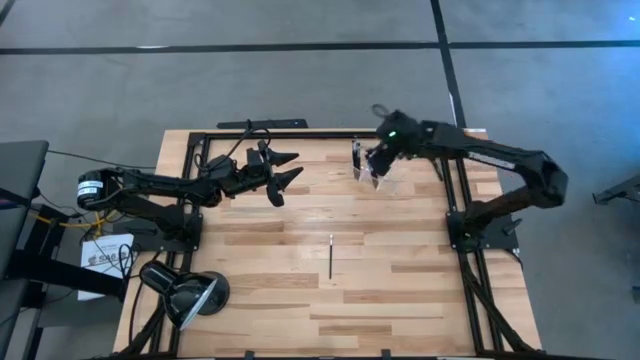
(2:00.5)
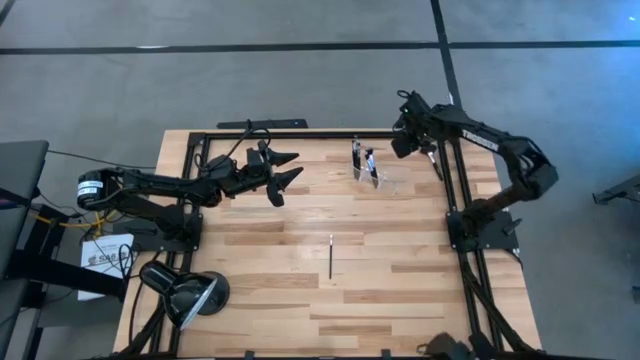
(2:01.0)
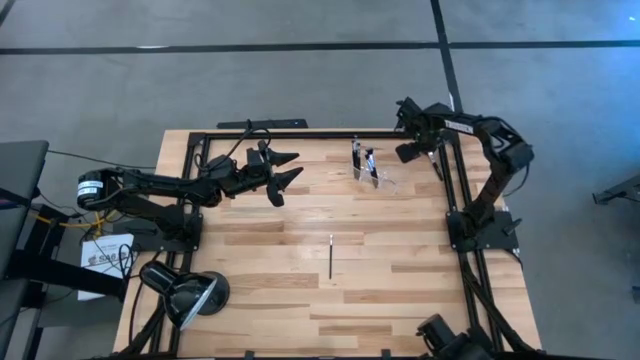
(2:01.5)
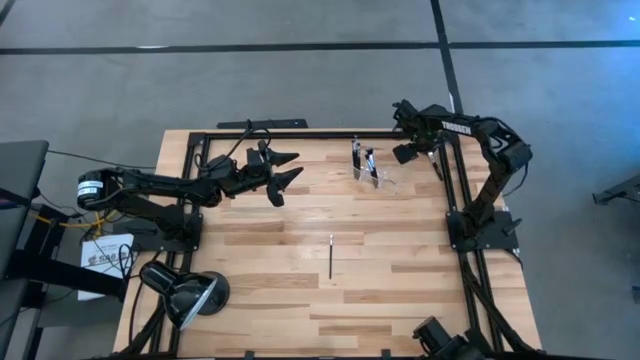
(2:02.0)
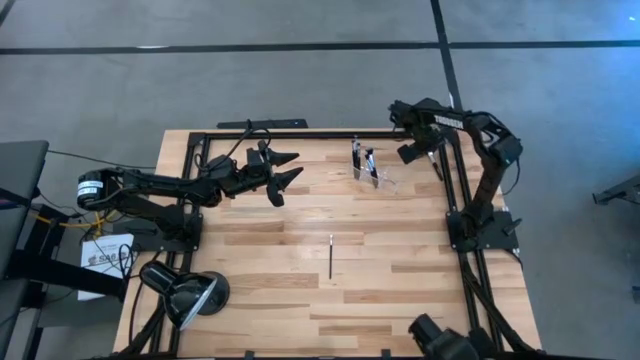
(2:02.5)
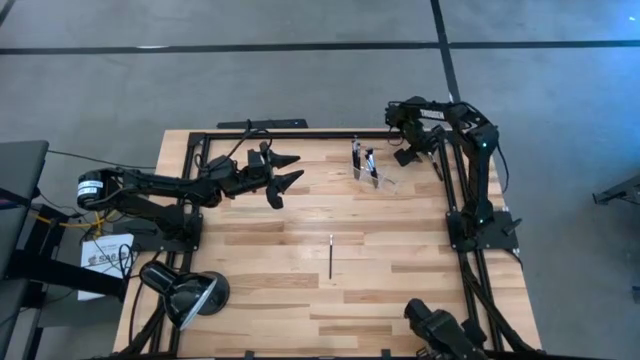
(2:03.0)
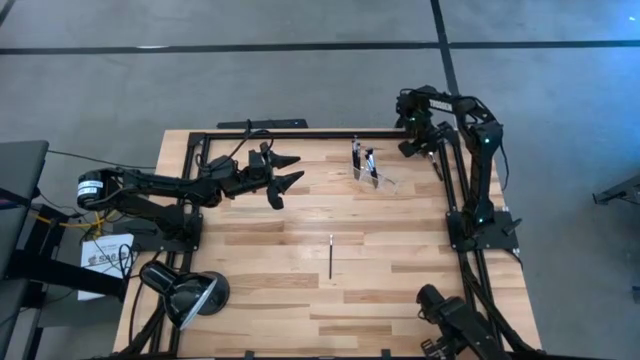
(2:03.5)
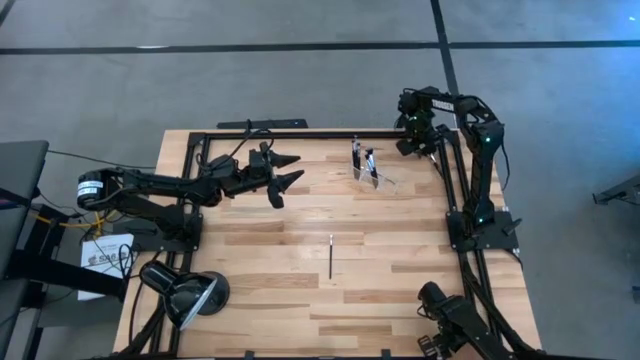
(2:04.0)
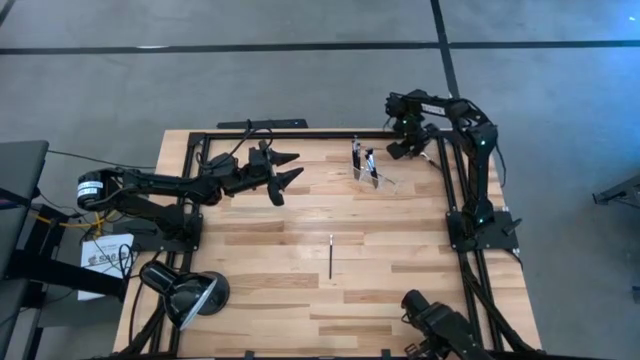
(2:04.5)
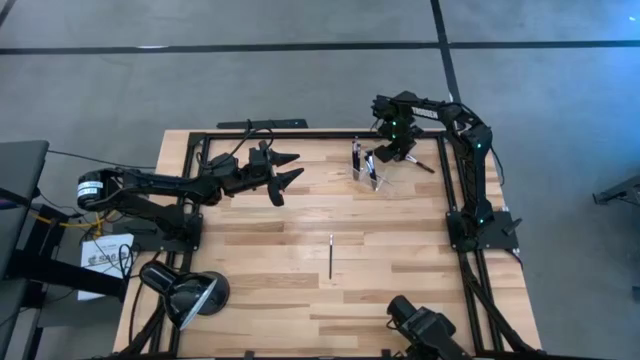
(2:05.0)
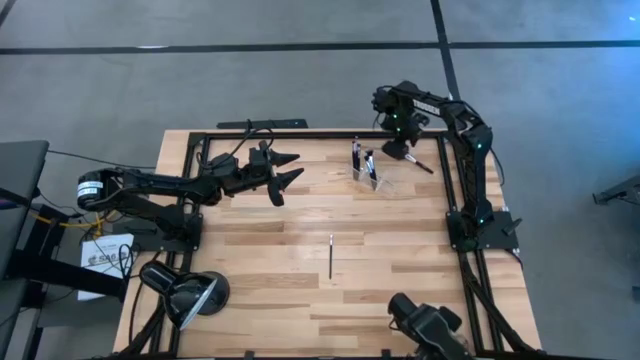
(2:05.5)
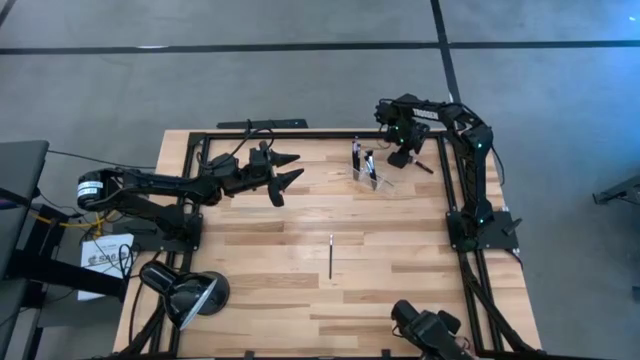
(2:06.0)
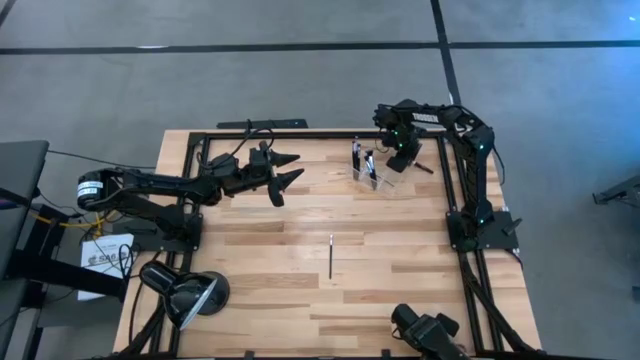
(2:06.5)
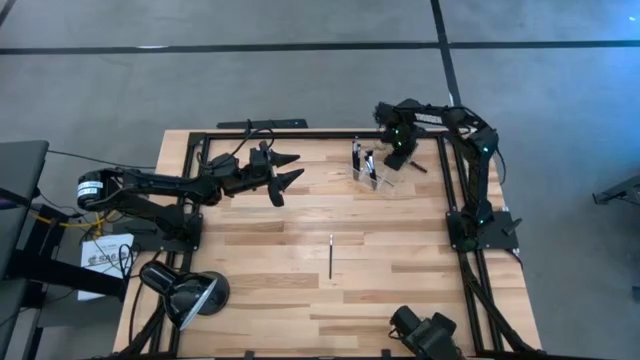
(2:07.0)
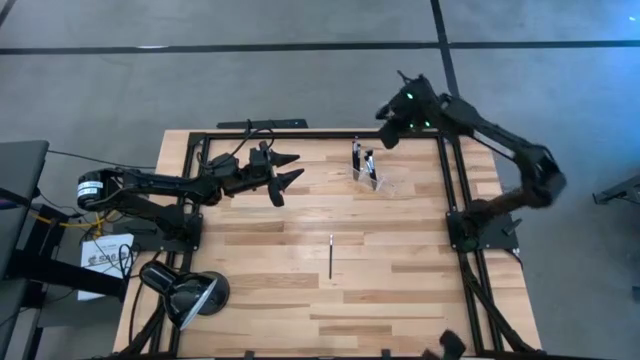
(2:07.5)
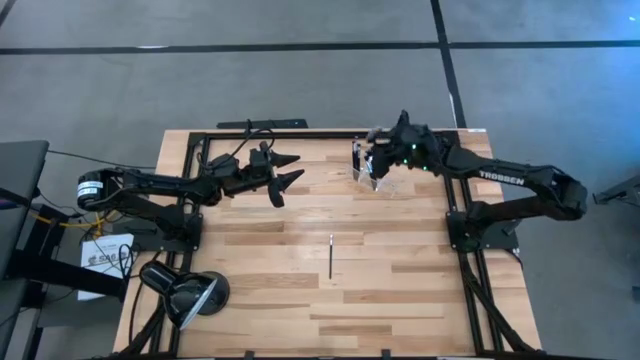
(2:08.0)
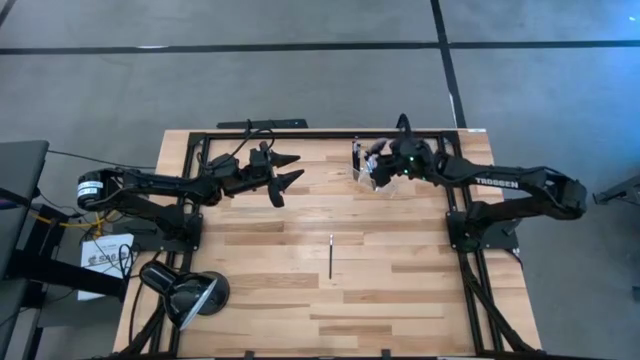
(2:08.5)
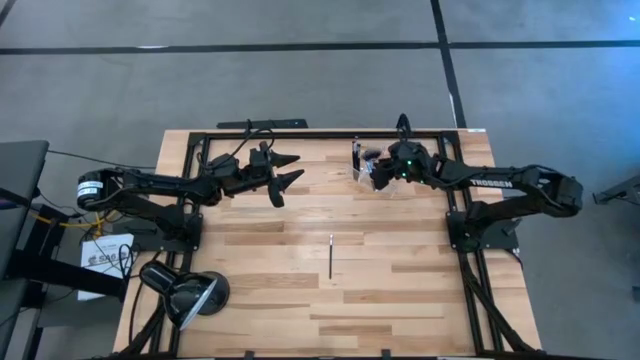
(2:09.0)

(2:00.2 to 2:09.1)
Task: Put items in baskets/containers
Put the black highlighter brush into the transparent organizer

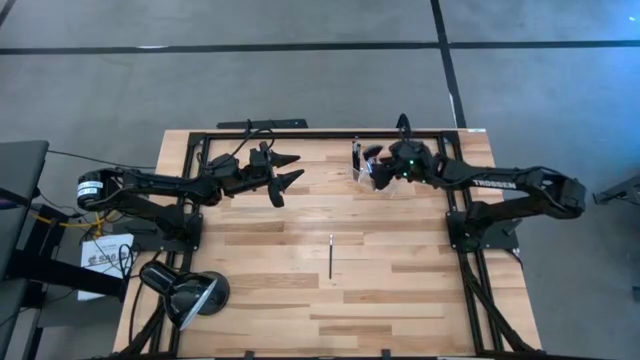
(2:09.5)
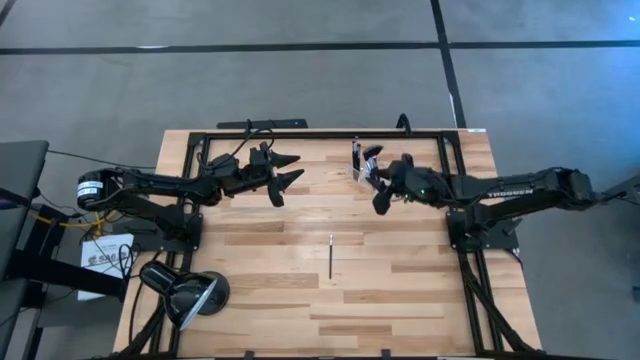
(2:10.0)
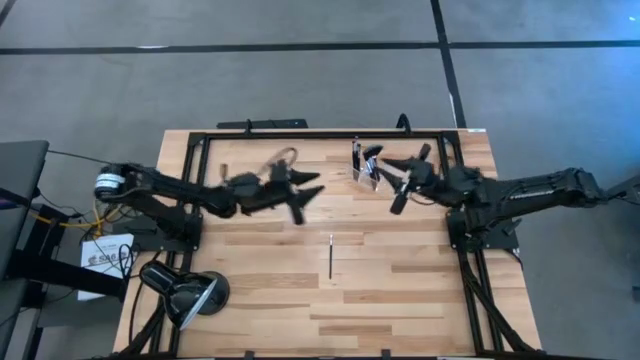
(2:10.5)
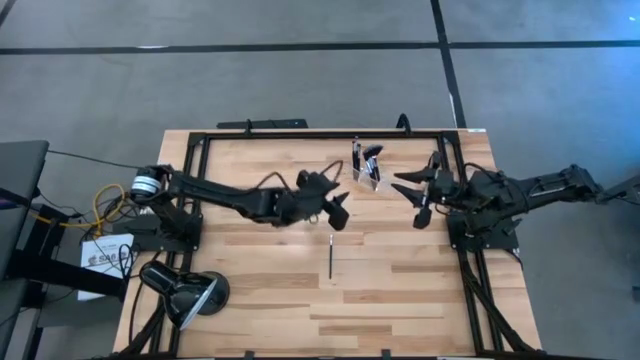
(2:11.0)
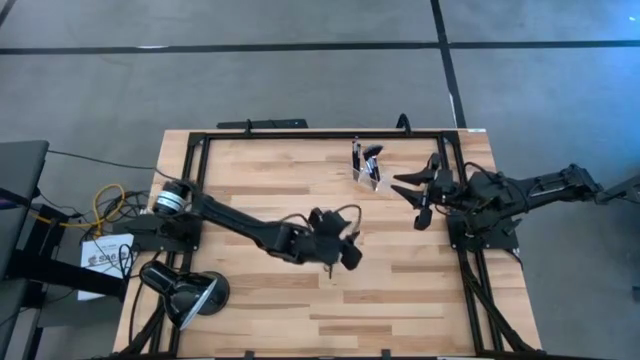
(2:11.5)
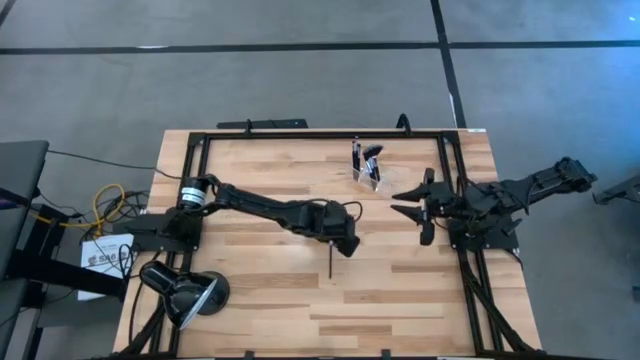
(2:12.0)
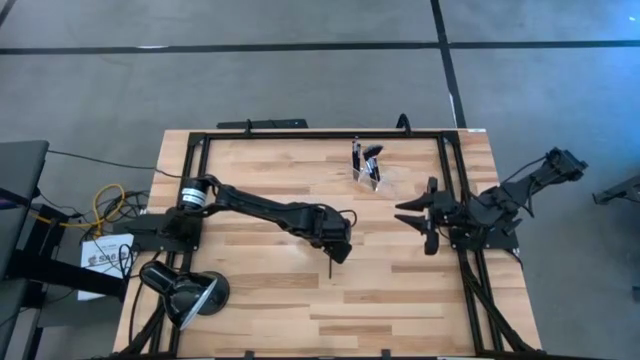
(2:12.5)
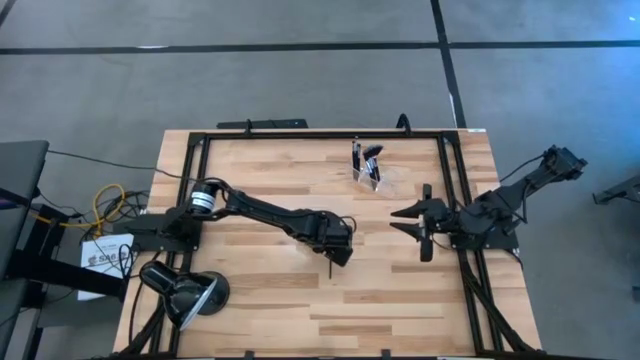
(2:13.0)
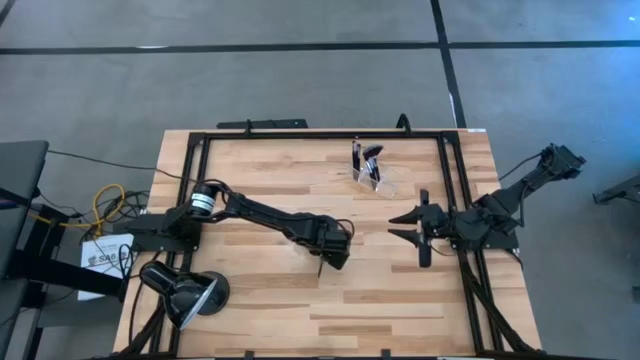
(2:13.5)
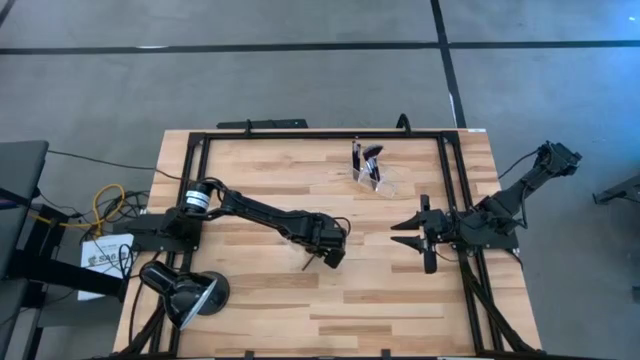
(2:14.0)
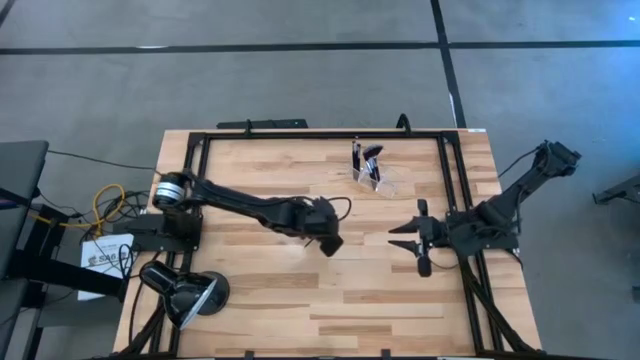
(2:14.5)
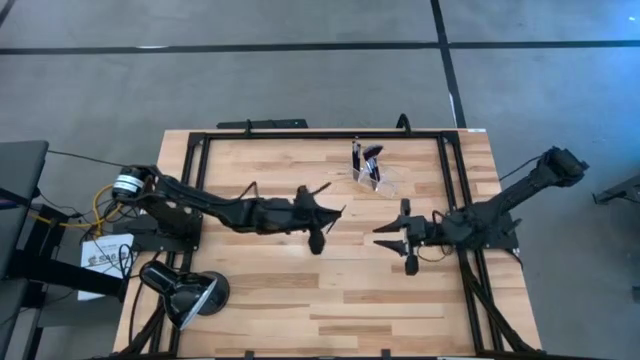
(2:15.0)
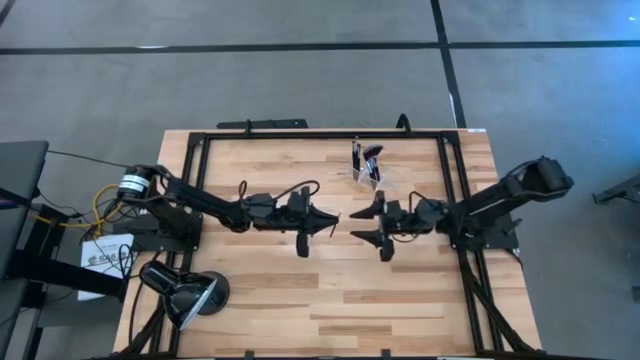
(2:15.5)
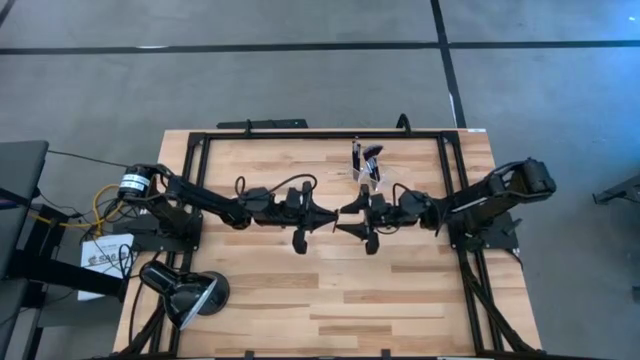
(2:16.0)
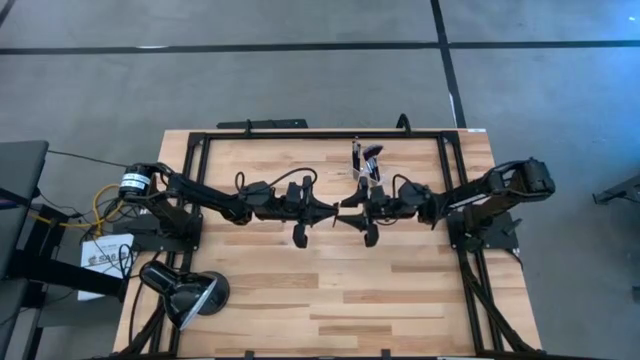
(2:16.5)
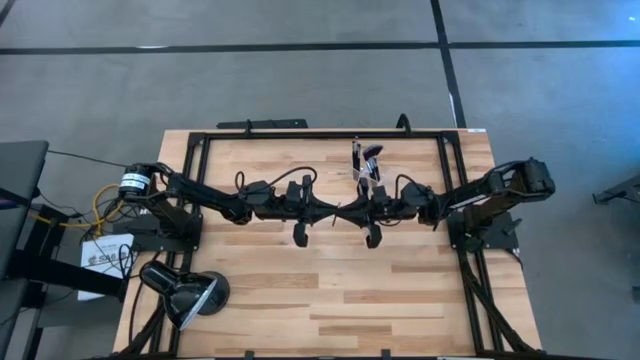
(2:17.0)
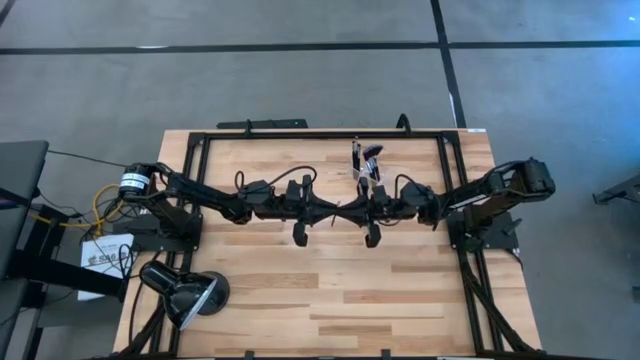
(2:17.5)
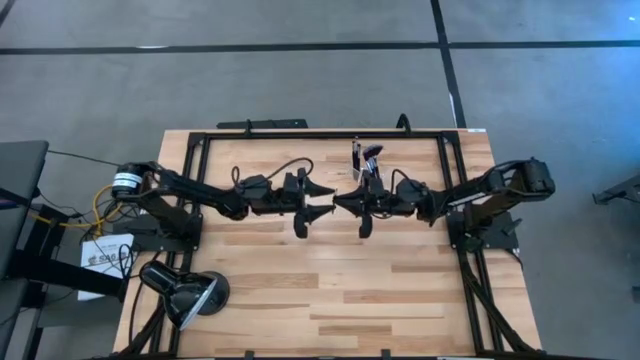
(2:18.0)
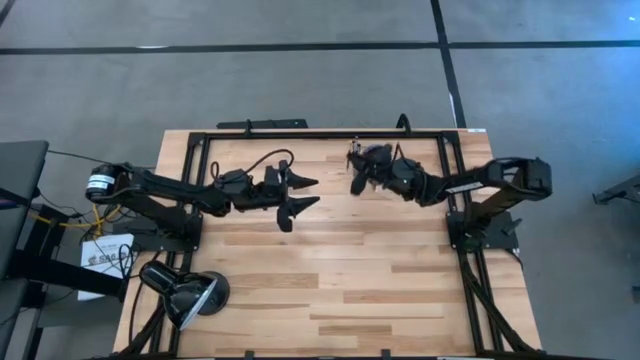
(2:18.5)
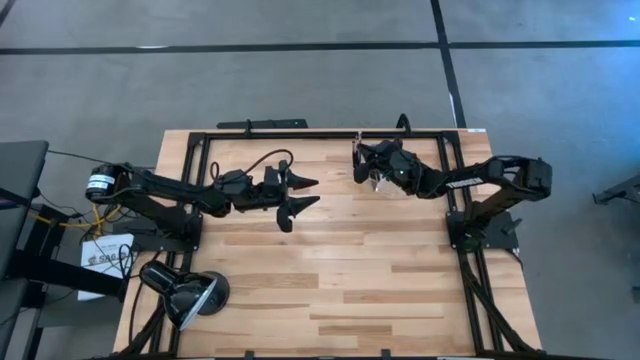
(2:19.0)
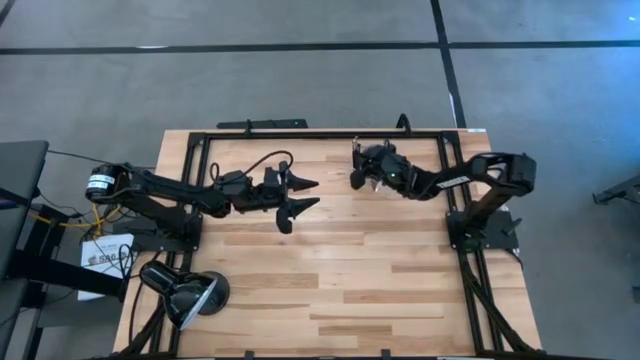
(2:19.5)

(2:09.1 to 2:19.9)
Put the black eyeshadow brush into the transparent organizer

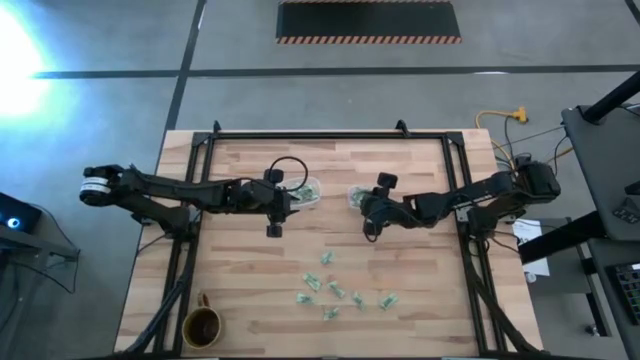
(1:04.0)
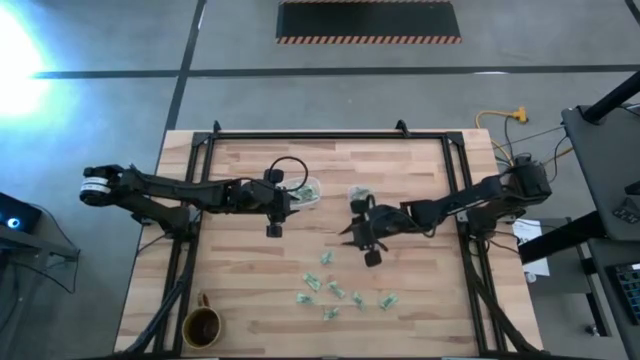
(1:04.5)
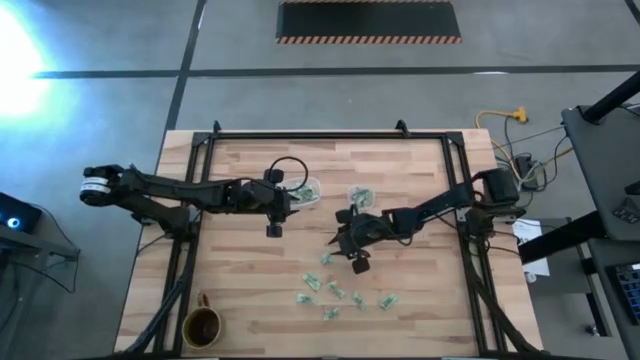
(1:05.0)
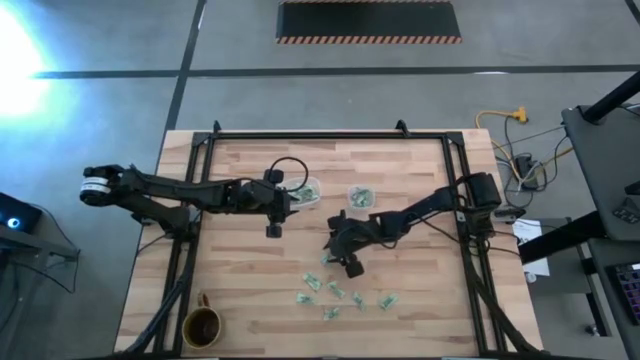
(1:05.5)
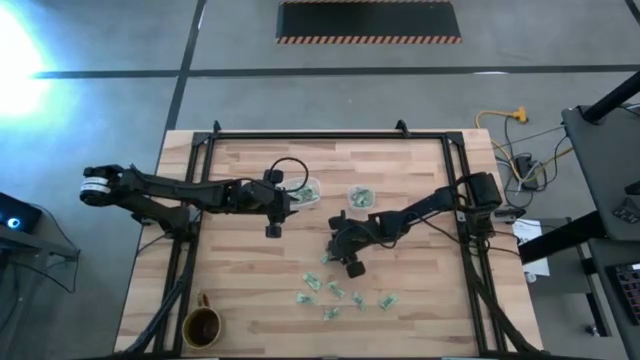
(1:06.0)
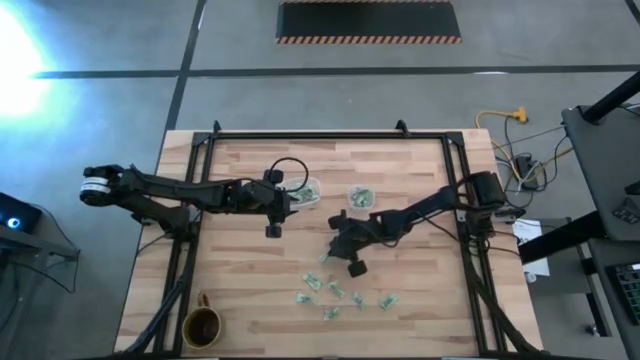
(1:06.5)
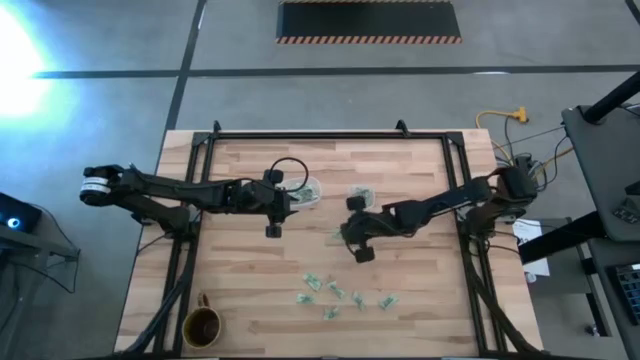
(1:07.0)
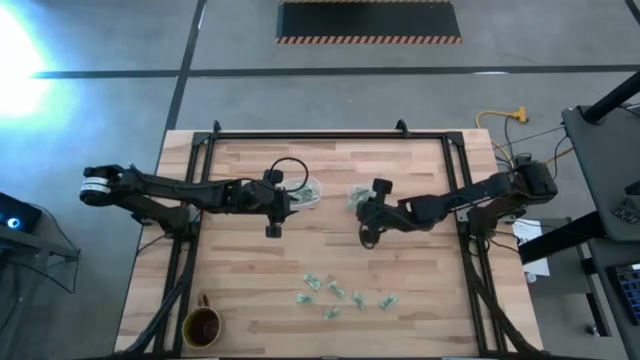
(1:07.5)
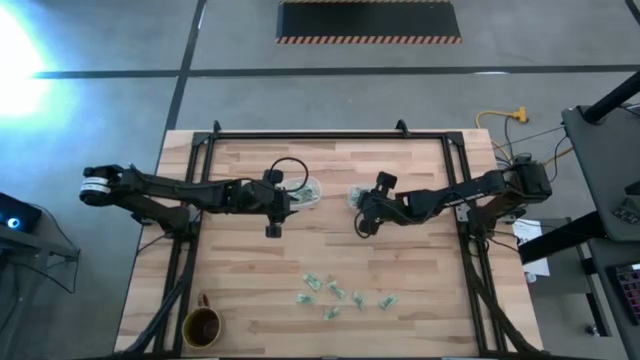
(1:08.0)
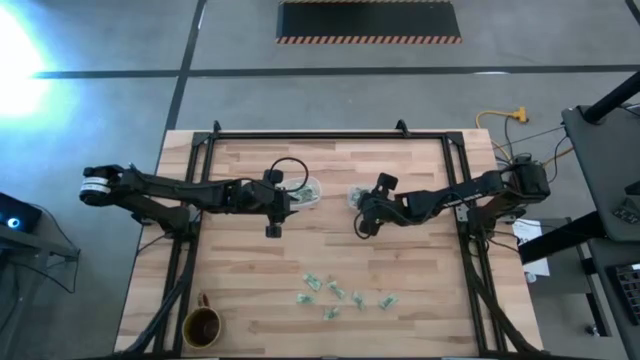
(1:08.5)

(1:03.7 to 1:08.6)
Task: Pick and place Stevia / Truvia into bins
Put the stevia packet into the transparent square container
